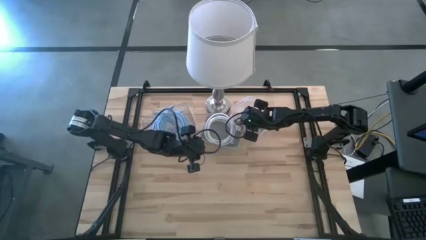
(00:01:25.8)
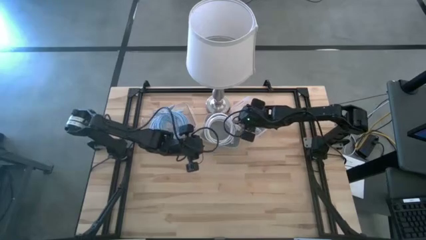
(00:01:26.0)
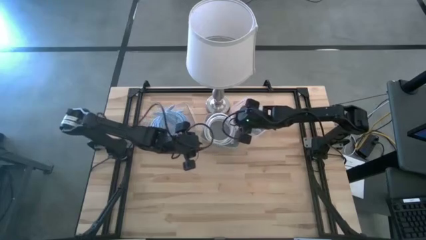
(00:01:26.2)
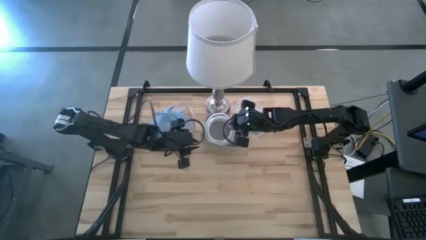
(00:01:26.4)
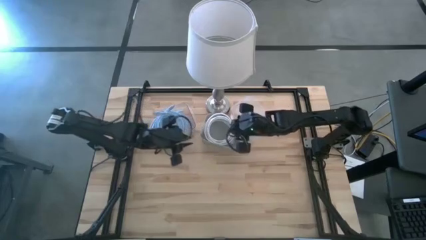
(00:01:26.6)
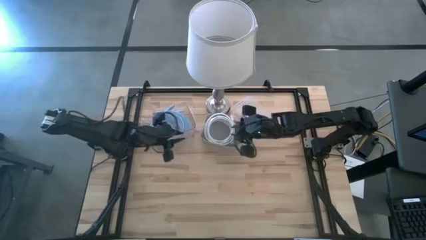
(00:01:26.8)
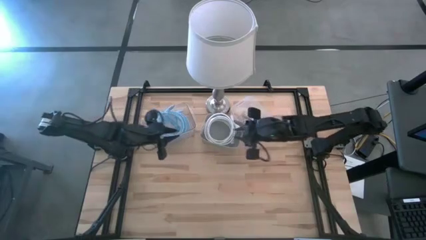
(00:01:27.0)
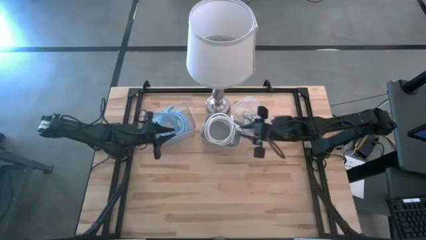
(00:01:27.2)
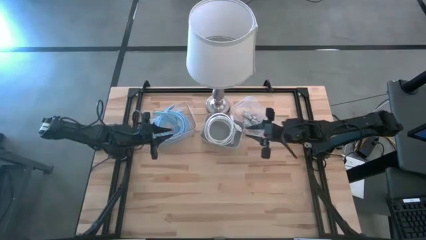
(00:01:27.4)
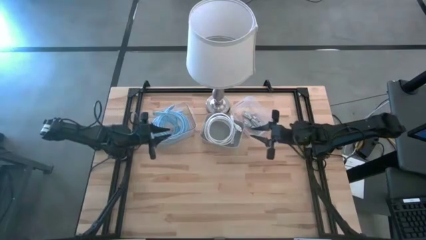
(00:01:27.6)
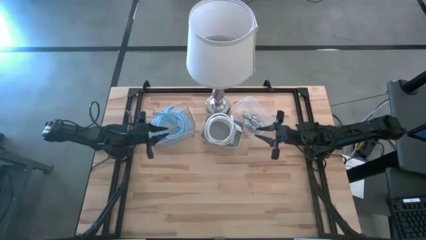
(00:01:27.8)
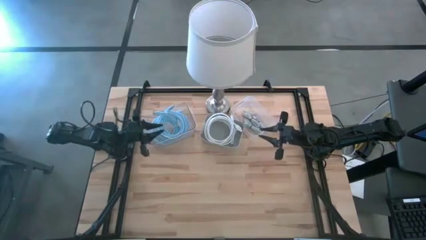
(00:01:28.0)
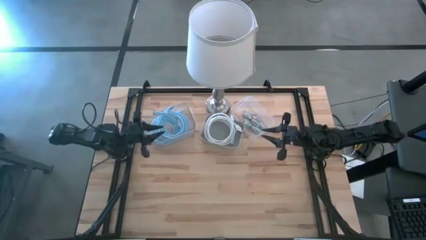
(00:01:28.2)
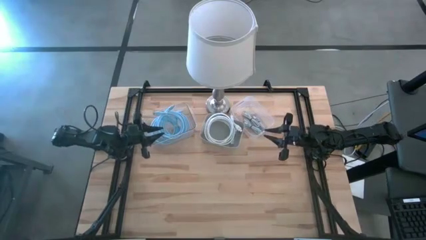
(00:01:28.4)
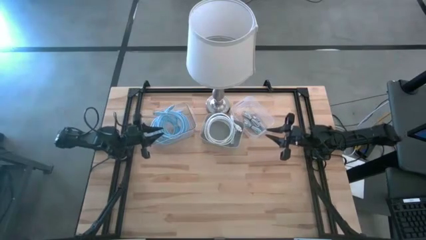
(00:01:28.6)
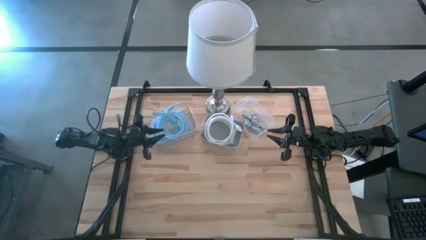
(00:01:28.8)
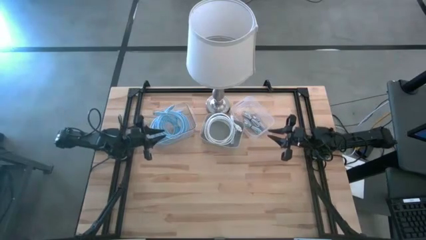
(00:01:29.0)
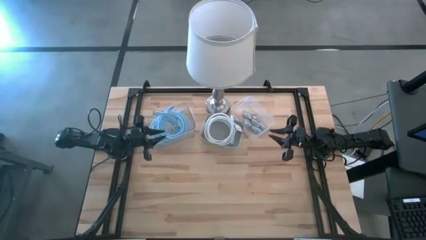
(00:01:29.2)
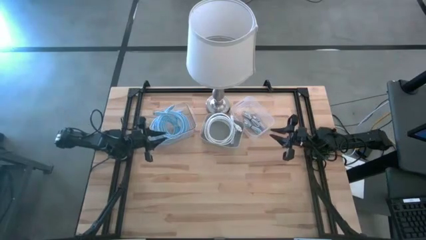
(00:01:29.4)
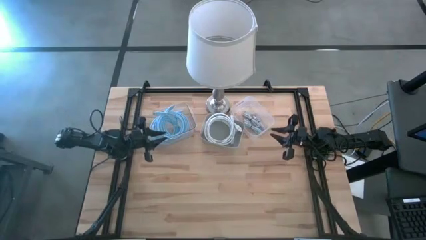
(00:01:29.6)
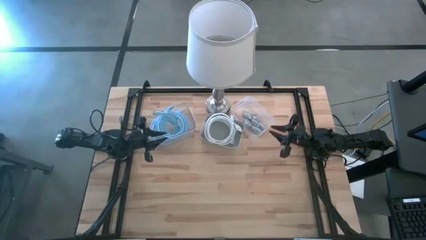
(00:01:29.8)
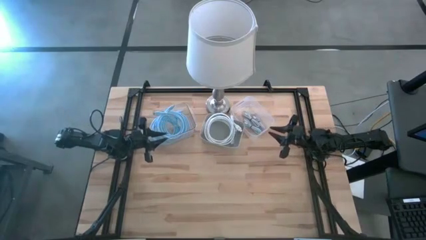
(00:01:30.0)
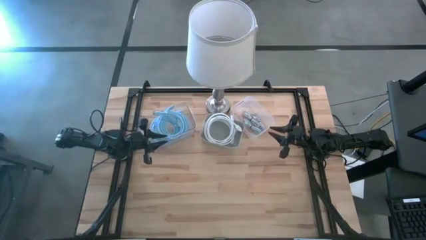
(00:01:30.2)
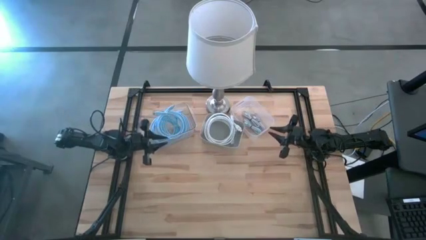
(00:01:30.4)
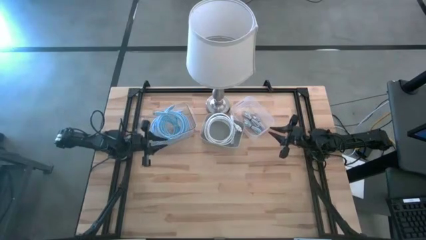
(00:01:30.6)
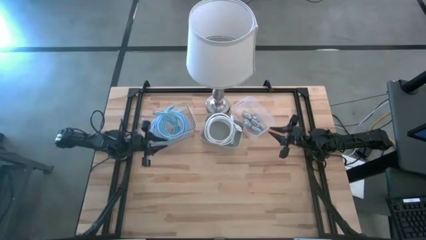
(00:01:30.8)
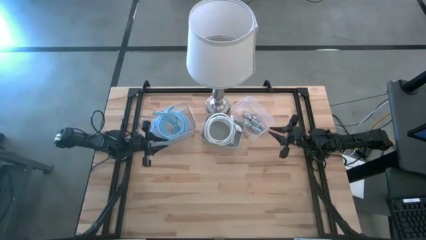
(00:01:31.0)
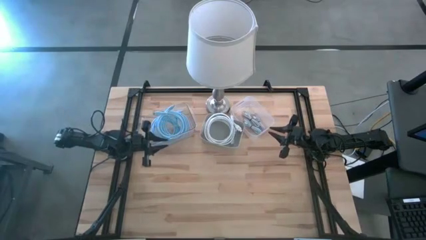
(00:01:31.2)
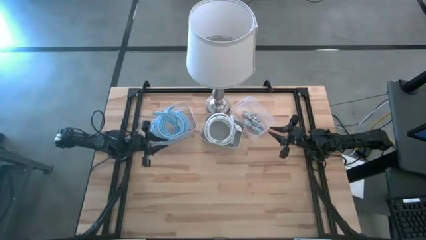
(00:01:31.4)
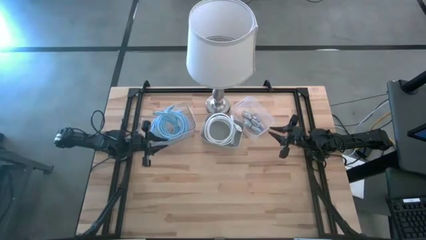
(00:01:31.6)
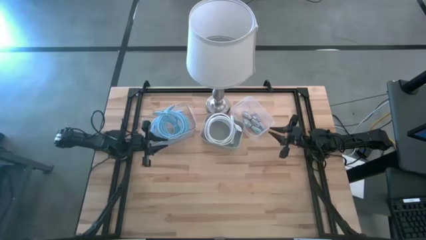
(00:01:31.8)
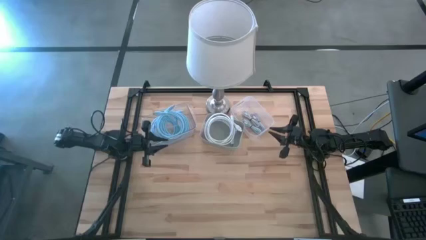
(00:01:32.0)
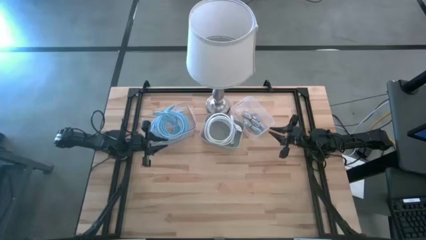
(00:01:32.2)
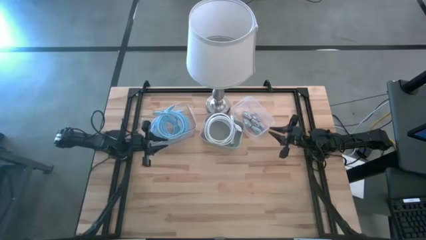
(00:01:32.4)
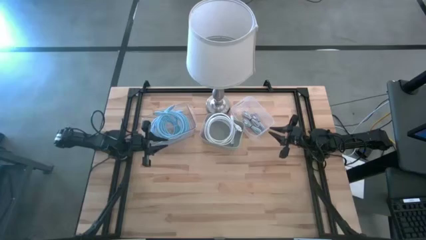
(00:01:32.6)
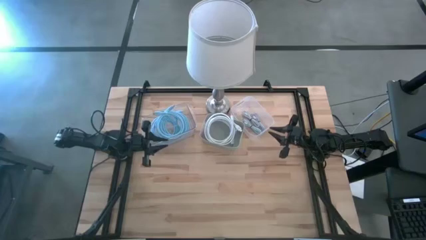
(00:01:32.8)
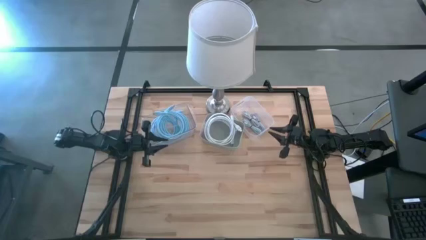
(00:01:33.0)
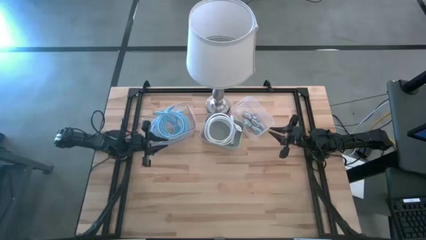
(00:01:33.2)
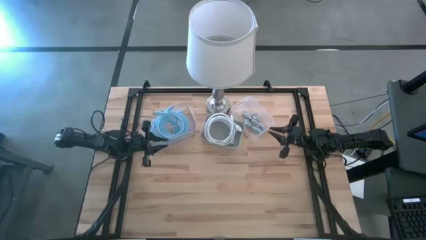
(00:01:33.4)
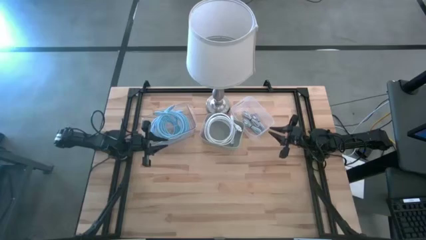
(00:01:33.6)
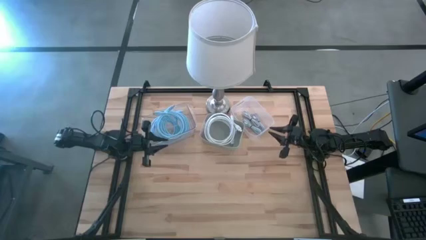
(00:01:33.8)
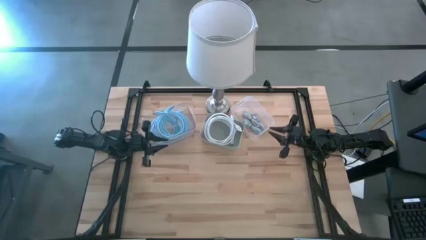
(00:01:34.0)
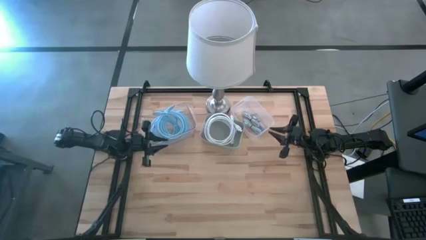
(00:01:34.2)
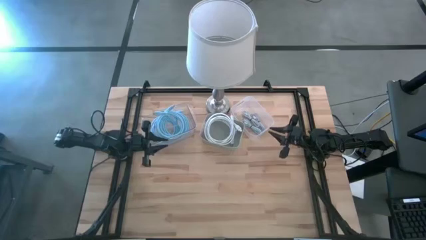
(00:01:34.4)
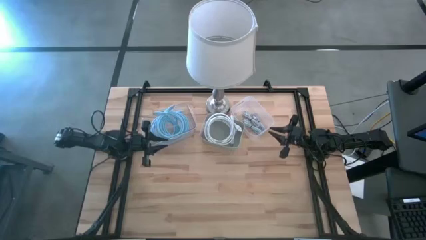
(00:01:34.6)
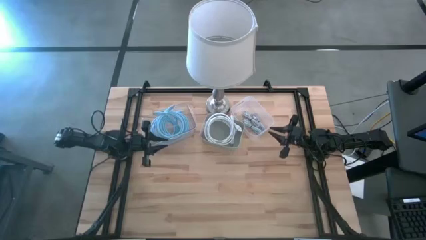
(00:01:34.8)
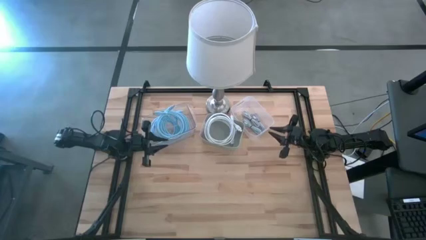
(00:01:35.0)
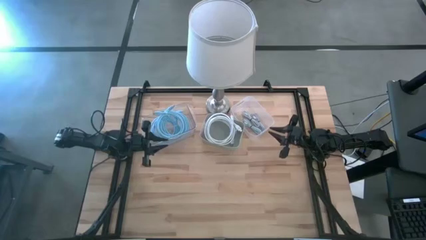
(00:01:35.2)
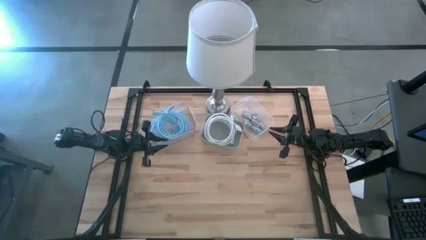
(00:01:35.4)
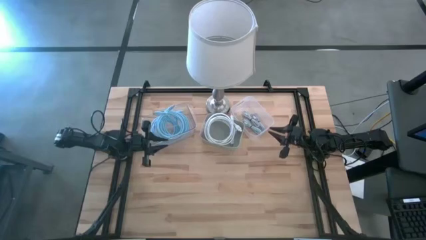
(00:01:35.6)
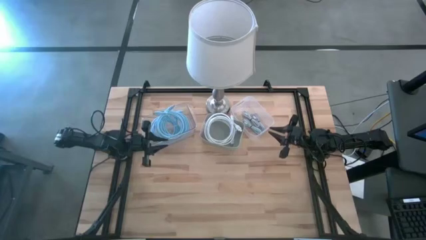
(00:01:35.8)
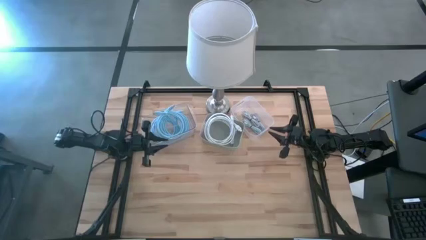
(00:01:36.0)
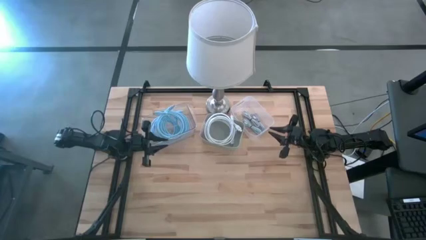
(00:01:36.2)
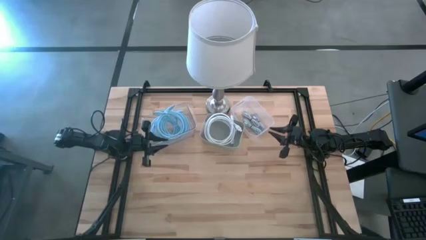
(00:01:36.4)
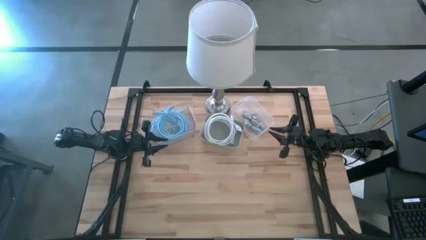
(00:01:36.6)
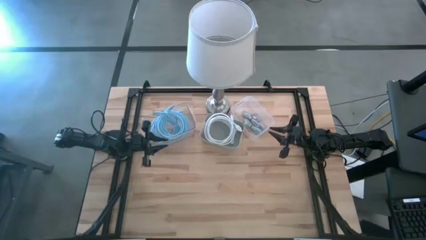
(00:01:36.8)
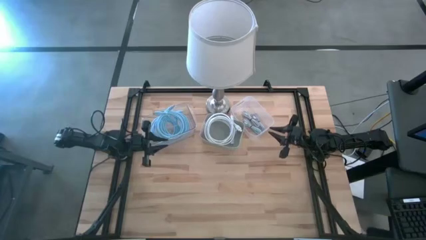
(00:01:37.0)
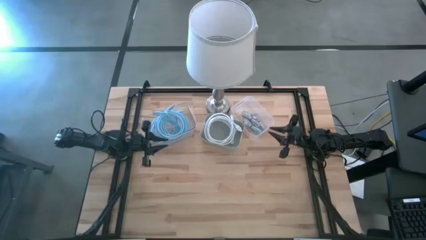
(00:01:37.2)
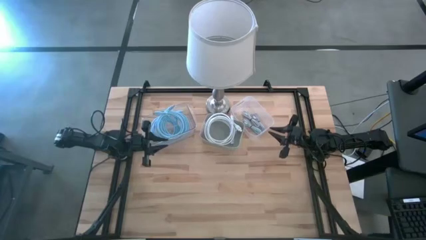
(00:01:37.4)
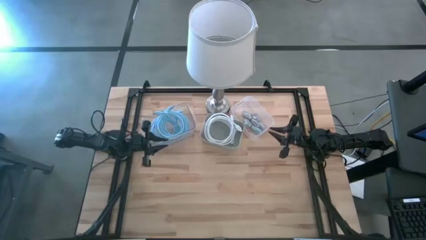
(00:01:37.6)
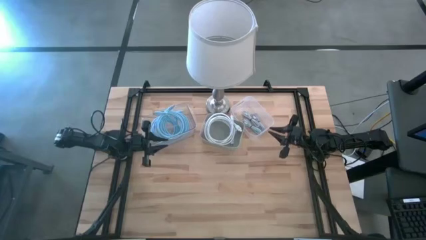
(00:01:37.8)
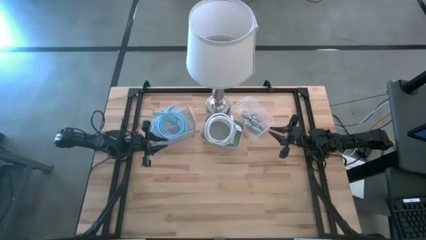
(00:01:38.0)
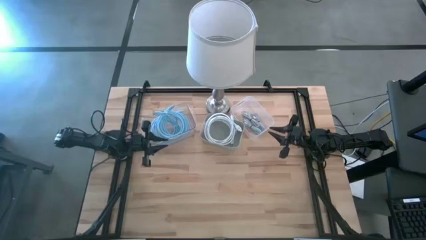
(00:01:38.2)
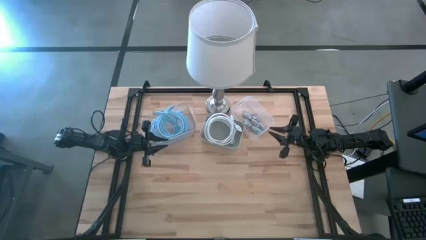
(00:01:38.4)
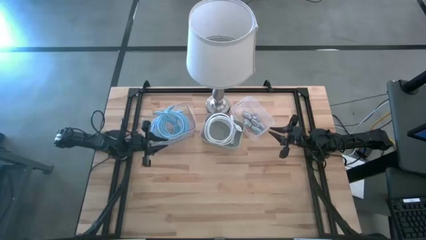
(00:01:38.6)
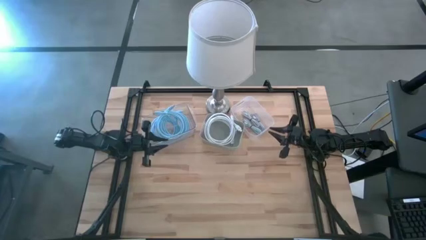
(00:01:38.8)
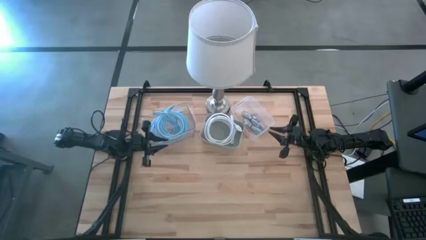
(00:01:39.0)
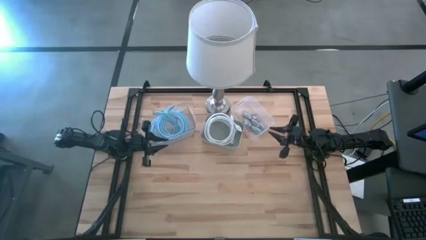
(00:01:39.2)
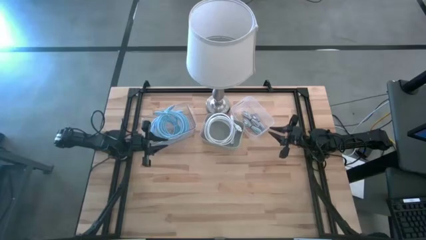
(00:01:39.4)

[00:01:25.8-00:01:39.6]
Task: Pick & Place USB Port
Return to Home Position
